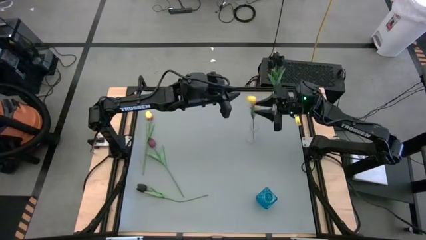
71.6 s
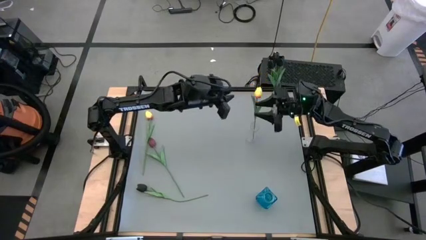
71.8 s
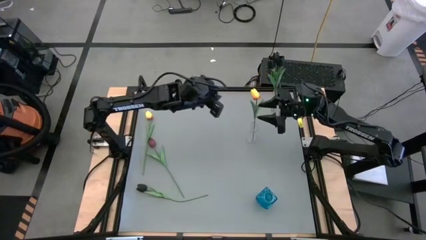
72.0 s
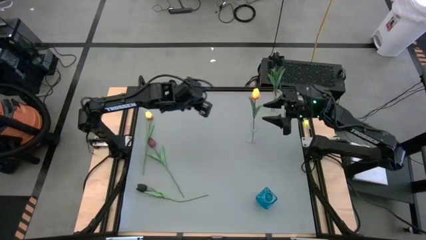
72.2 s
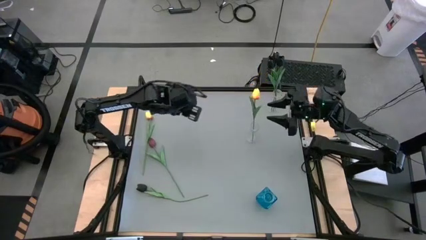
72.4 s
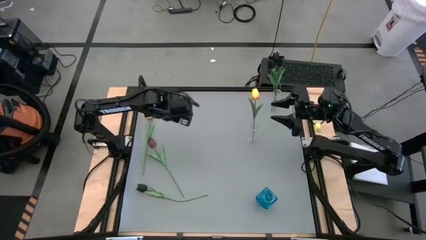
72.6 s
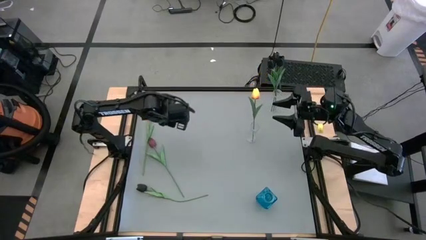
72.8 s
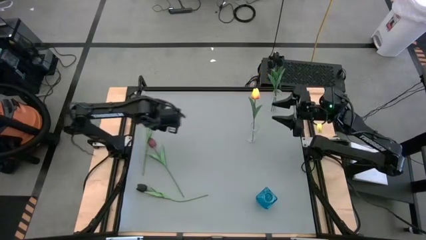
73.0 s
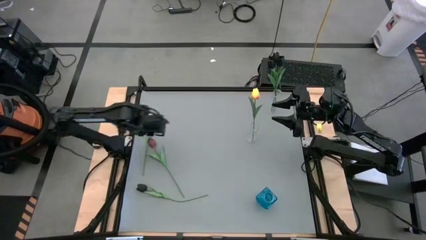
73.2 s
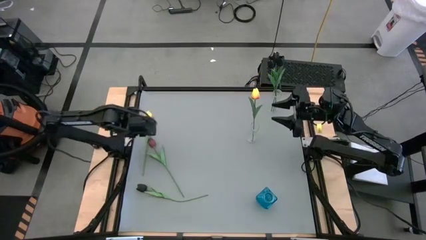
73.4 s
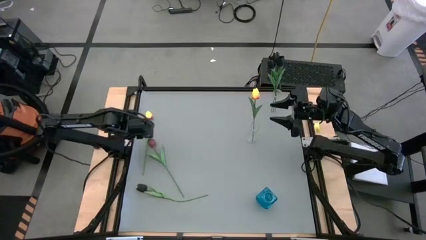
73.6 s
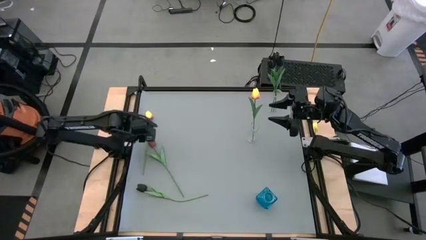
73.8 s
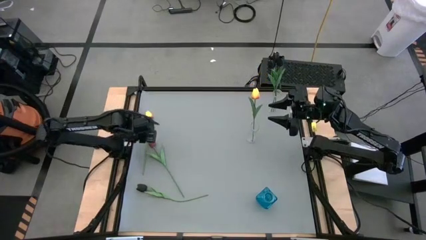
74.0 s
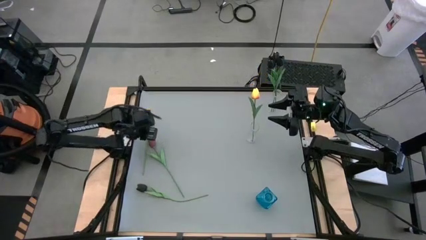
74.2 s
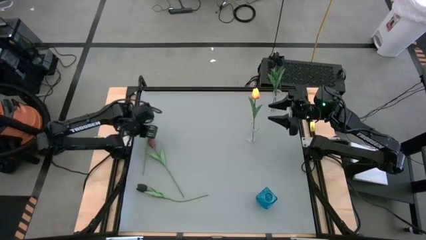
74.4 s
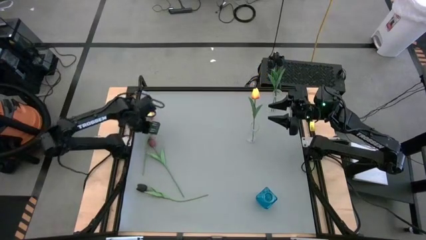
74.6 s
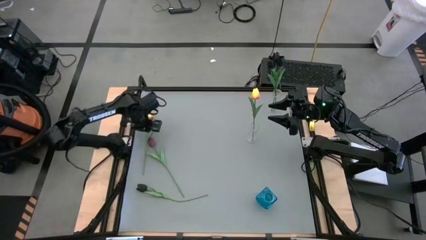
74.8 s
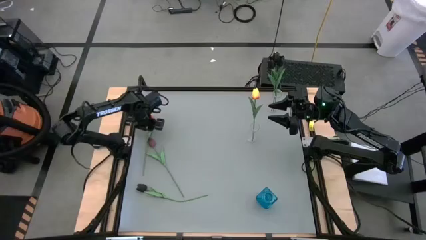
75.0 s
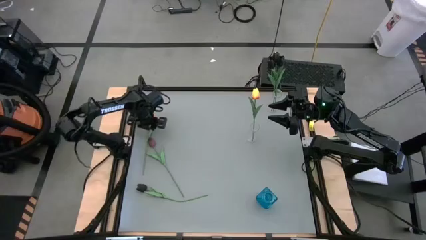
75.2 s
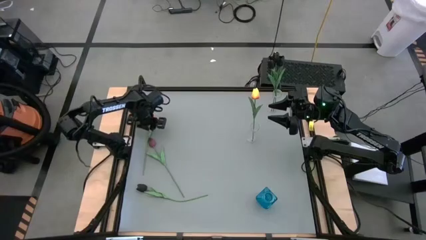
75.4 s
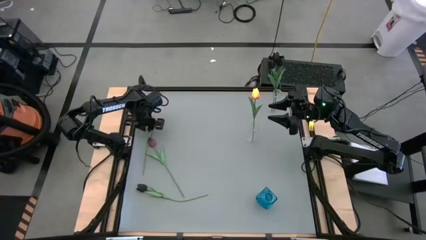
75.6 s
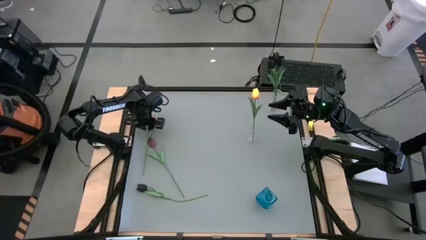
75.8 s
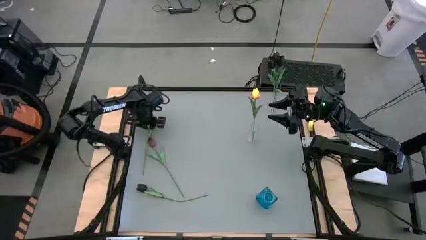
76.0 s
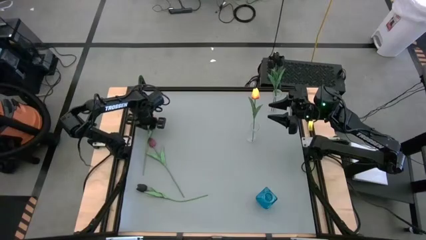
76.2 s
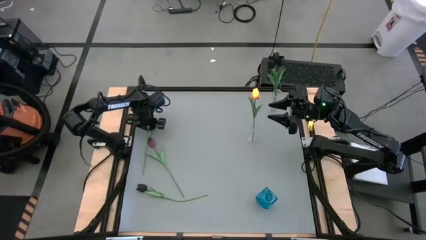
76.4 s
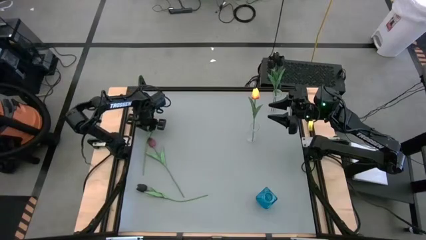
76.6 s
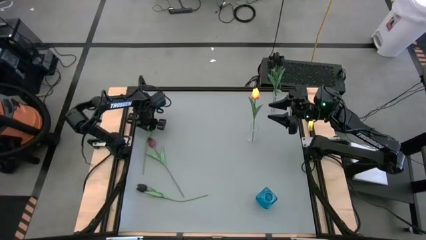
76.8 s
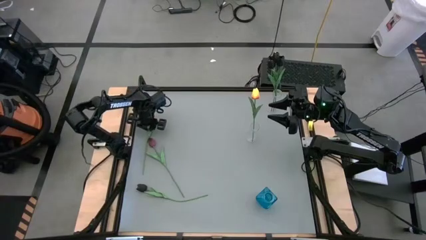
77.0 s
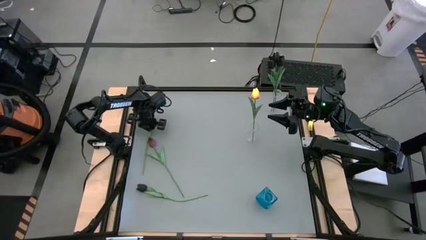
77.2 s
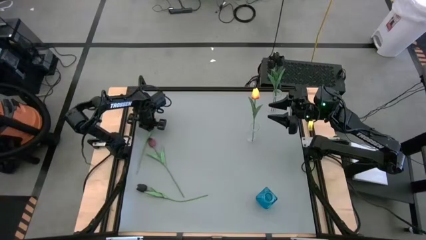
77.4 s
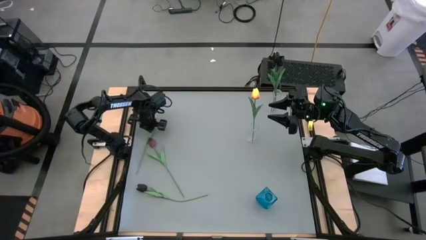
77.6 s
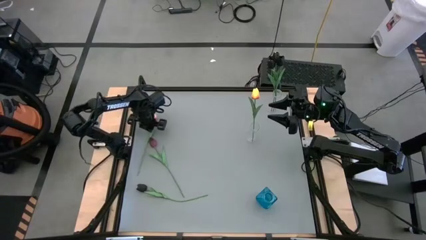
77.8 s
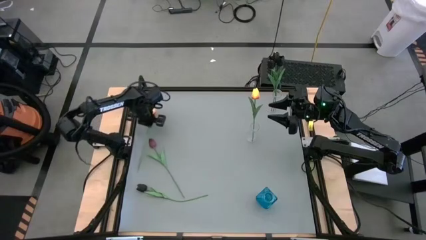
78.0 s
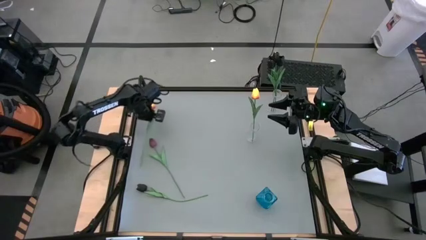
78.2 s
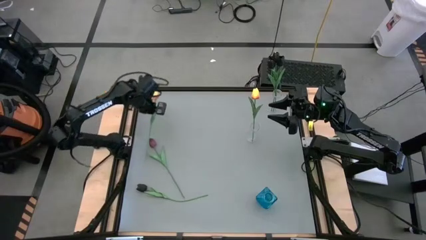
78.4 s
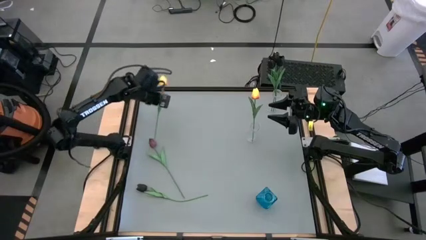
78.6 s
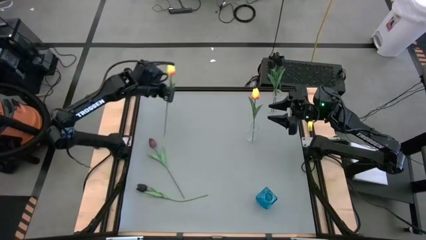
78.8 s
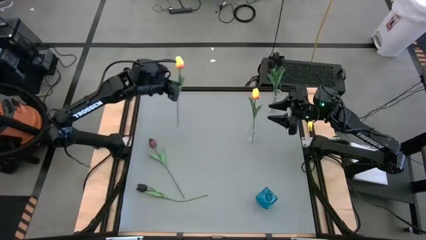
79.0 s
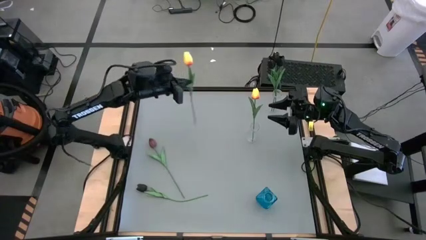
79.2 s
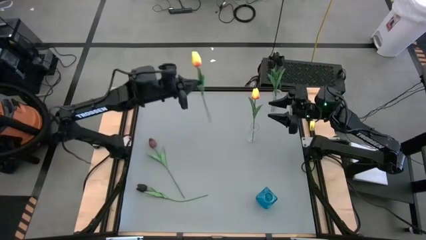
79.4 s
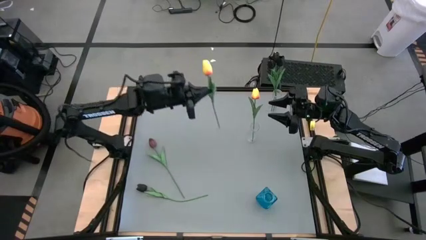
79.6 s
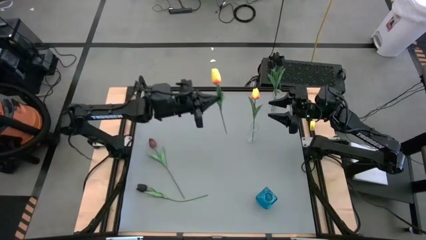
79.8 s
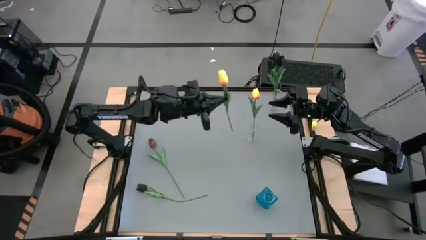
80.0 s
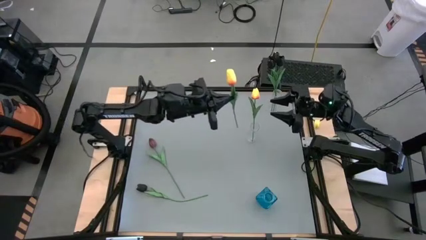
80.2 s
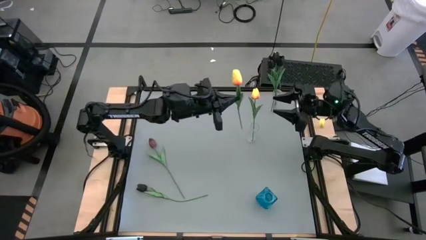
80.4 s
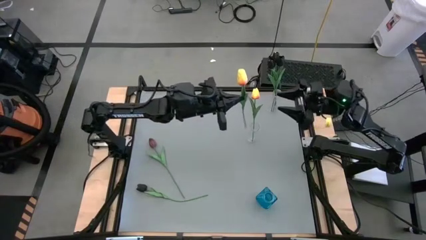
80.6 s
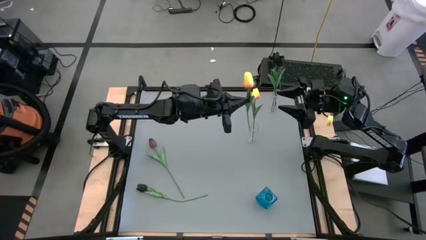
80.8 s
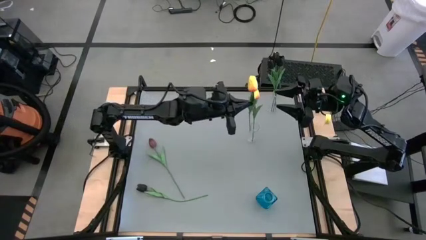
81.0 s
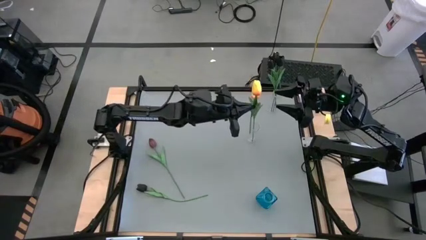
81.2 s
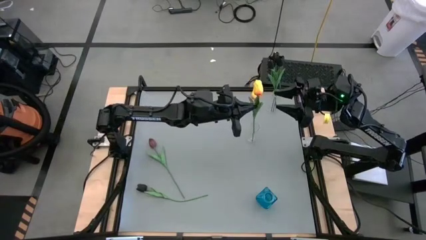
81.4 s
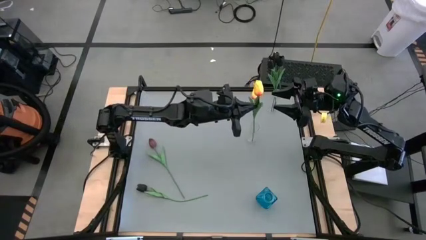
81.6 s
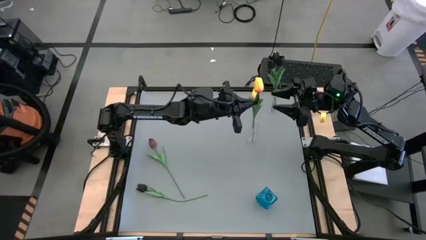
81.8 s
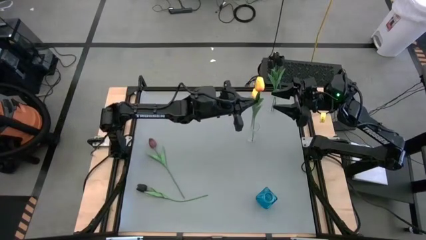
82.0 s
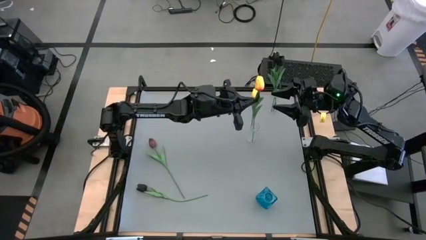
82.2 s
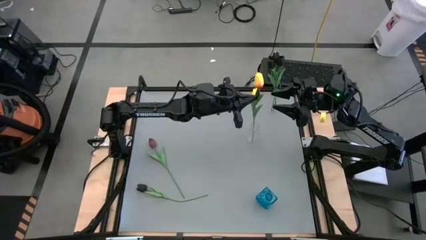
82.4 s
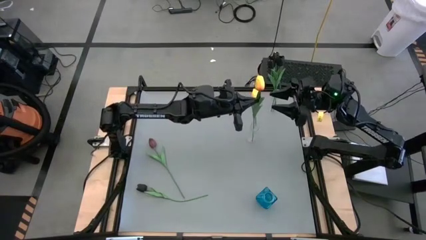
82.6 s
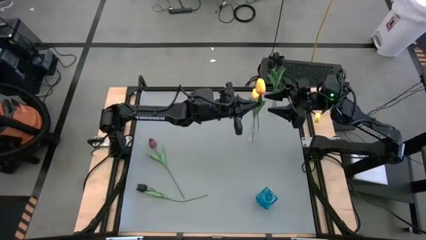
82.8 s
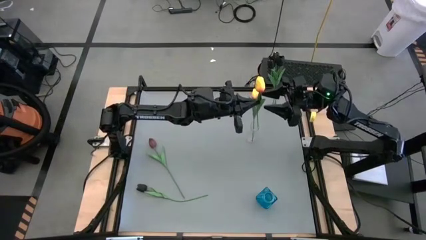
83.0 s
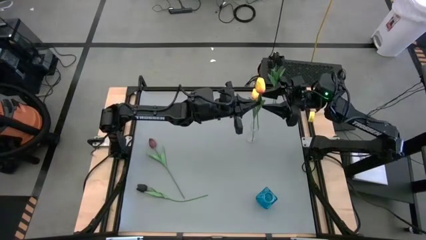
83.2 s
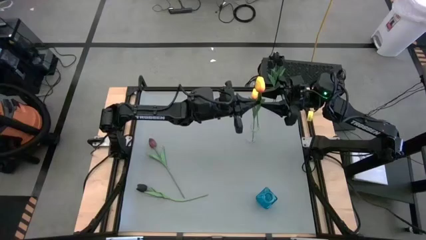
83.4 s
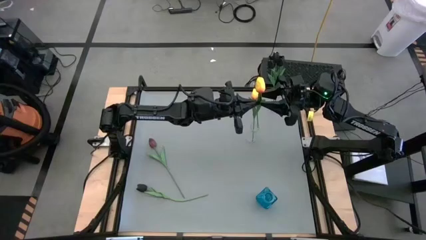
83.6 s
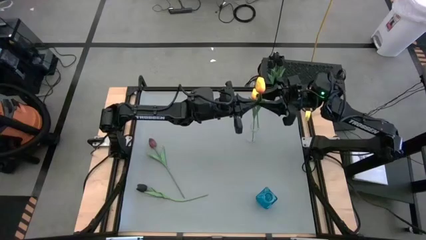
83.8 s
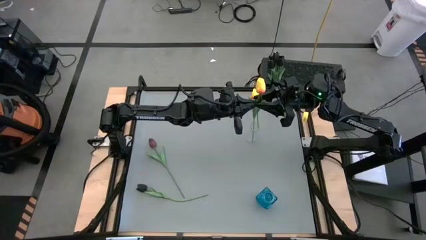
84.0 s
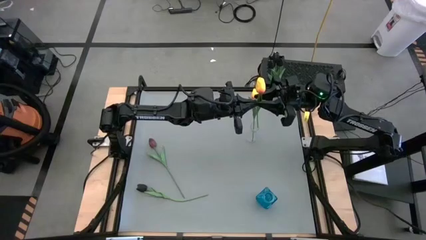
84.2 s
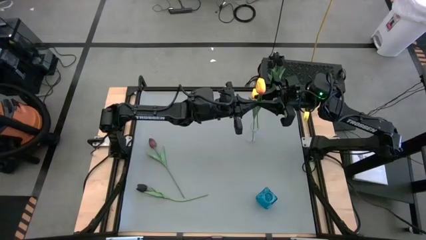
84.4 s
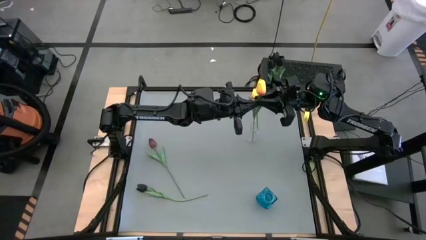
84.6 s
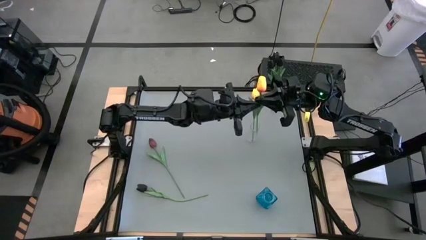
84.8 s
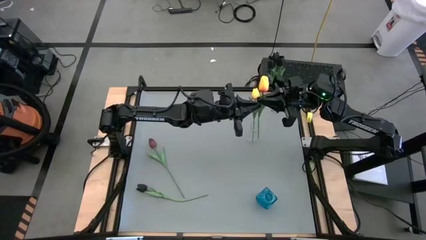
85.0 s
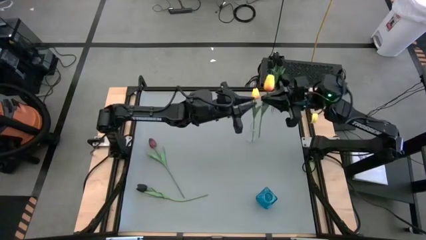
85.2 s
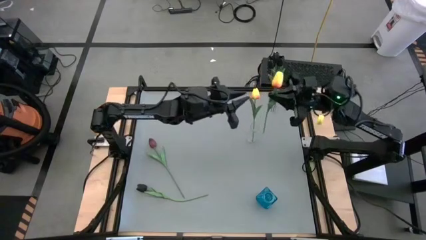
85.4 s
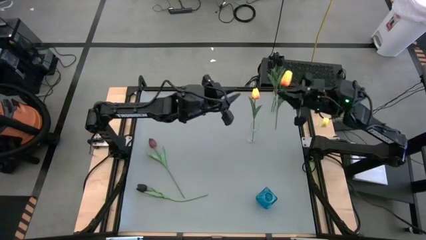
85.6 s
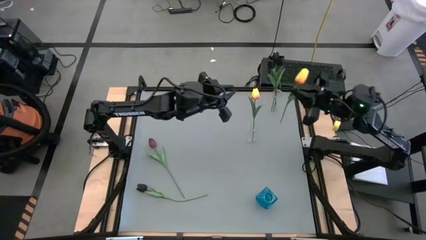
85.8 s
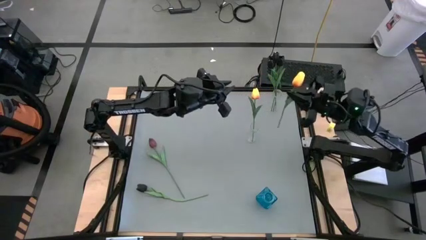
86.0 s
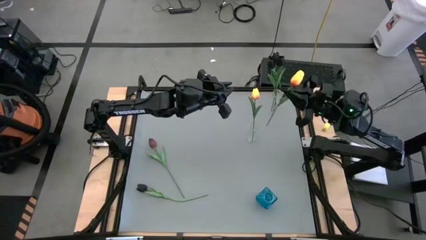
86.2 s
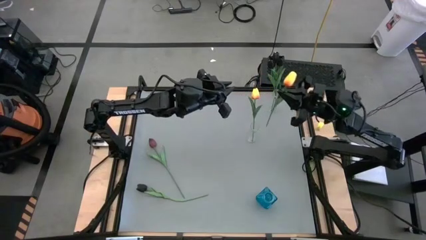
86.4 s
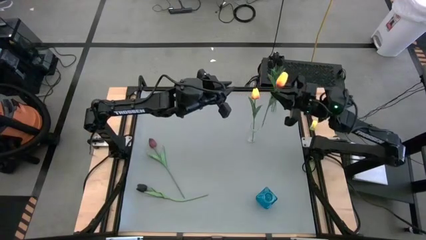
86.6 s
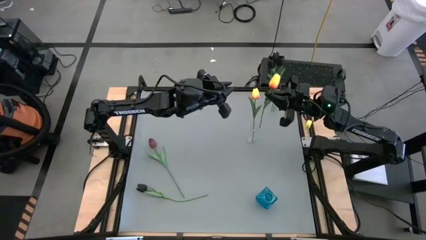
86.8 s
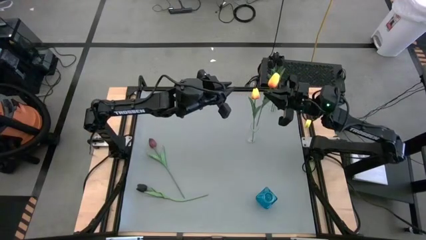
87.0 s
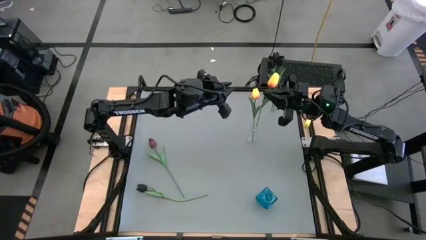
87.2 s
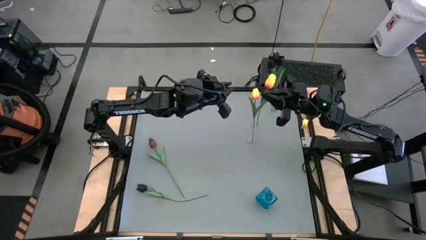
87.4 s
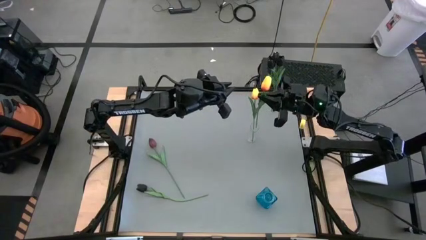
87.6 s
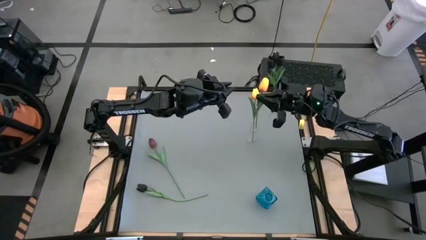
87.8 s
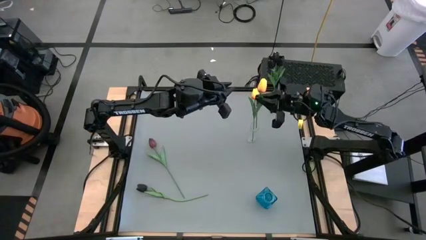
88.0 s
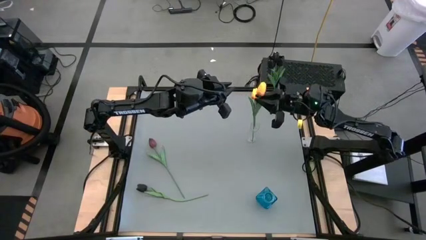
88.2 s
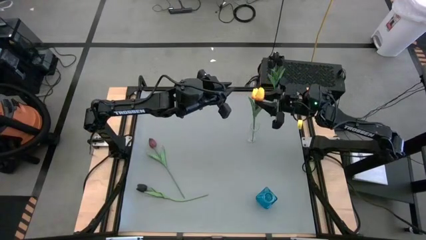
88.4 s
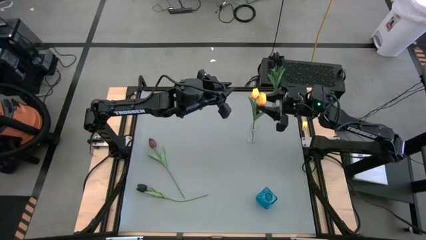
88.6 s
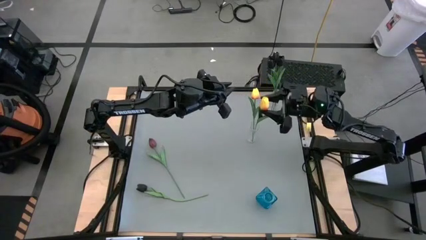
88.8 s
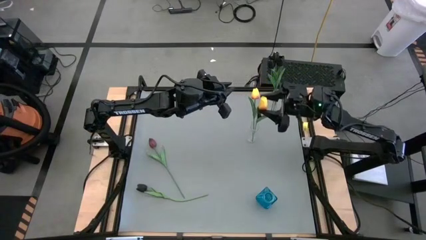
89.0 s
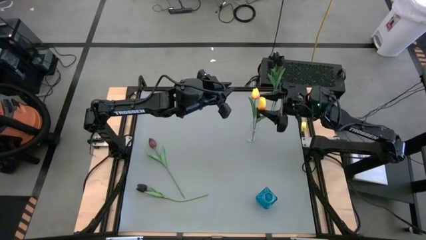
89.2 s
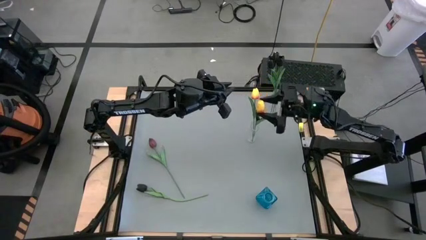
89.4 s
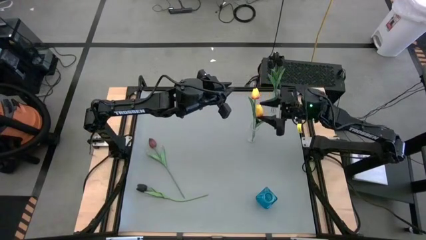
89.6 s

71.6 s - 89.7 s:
Task: Sort flowers into vase by color
Put the yellow tulip into the bottom transparent vase
